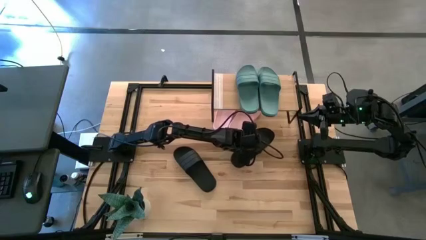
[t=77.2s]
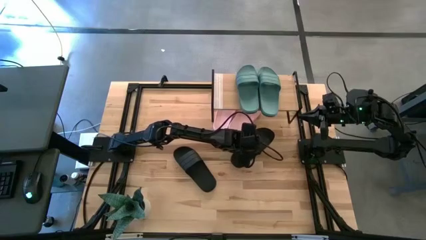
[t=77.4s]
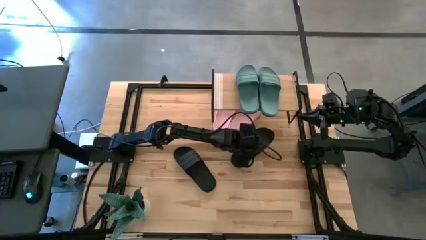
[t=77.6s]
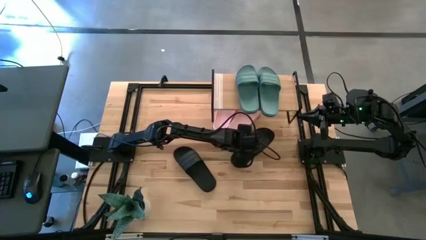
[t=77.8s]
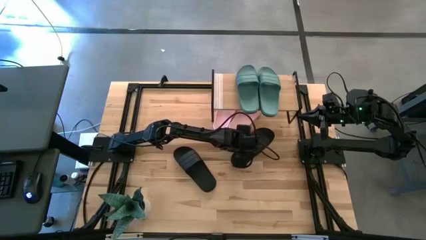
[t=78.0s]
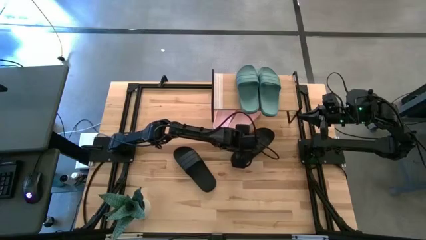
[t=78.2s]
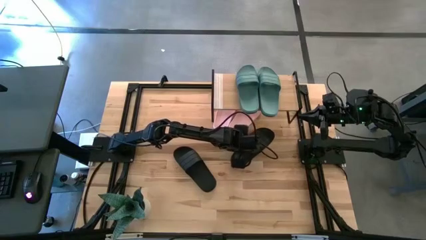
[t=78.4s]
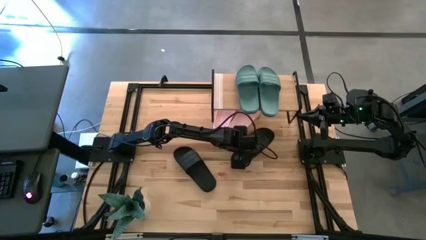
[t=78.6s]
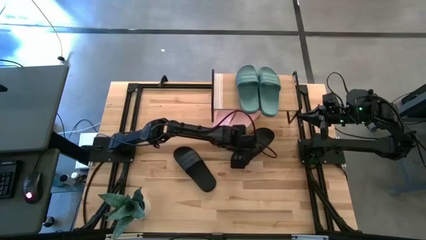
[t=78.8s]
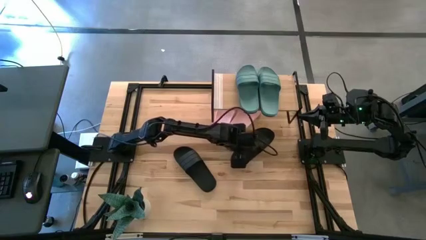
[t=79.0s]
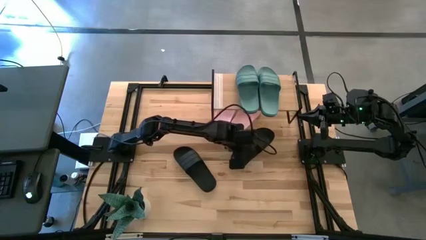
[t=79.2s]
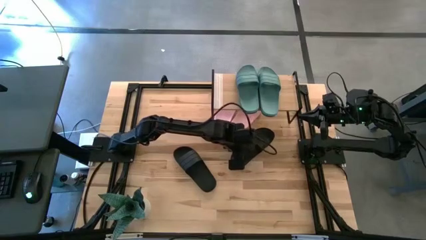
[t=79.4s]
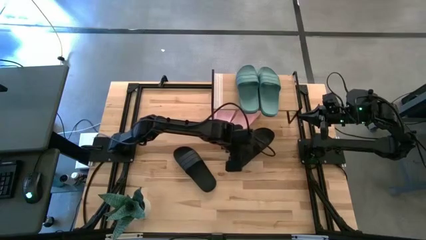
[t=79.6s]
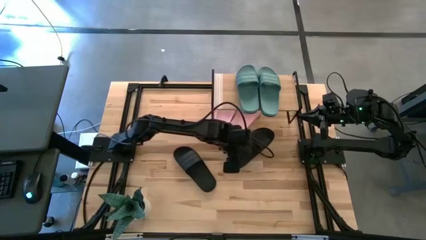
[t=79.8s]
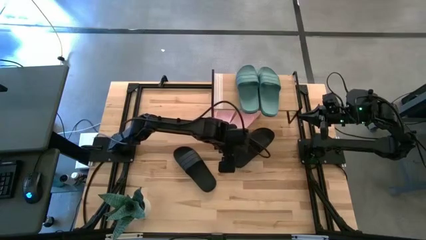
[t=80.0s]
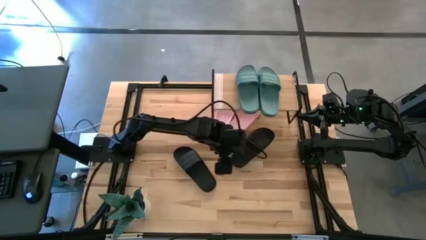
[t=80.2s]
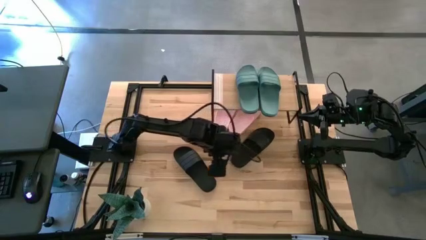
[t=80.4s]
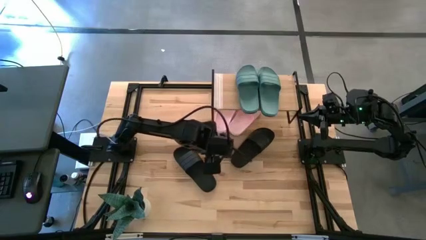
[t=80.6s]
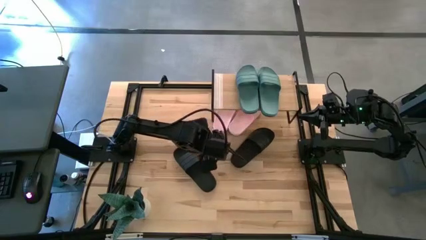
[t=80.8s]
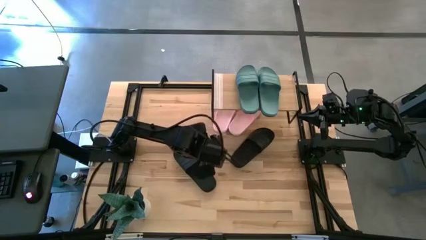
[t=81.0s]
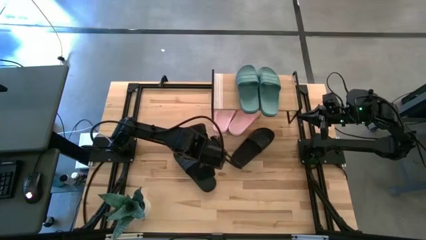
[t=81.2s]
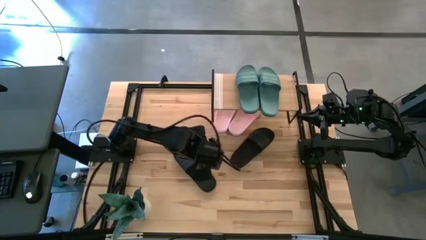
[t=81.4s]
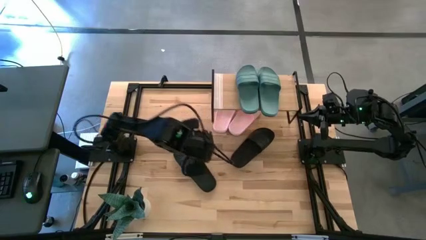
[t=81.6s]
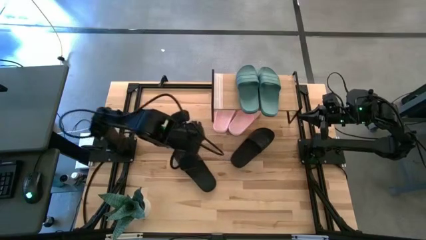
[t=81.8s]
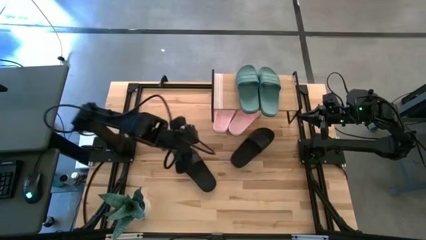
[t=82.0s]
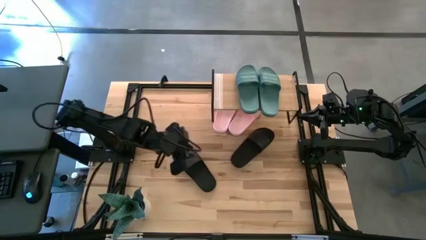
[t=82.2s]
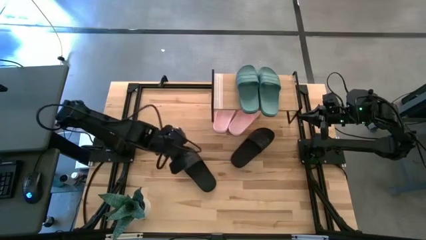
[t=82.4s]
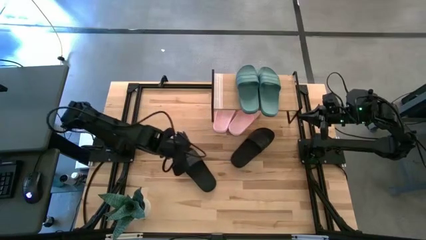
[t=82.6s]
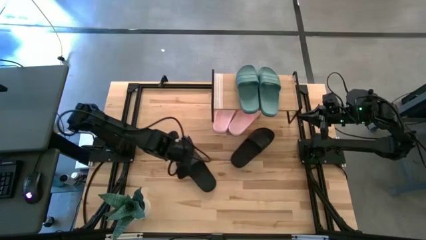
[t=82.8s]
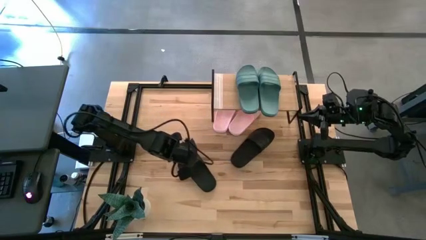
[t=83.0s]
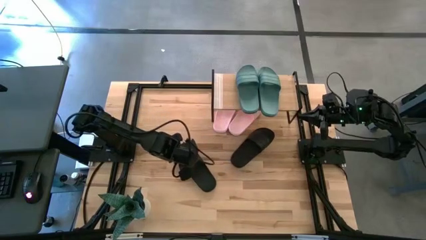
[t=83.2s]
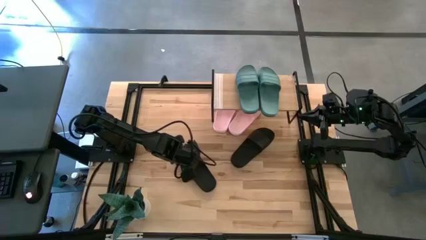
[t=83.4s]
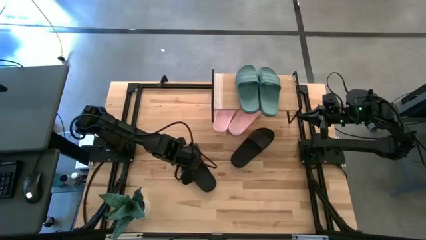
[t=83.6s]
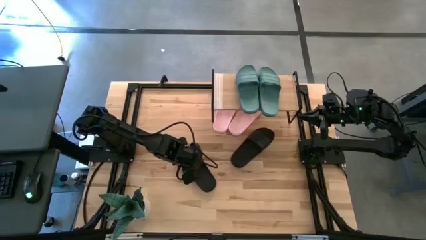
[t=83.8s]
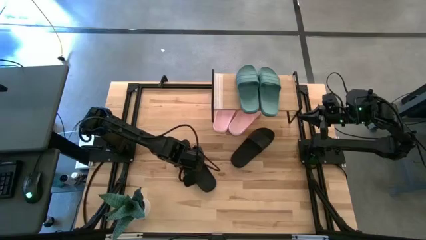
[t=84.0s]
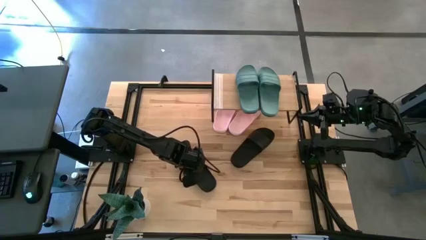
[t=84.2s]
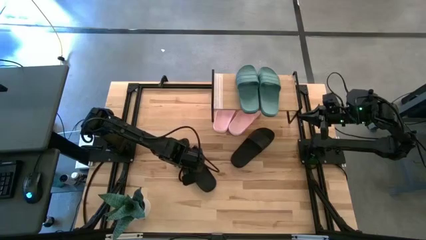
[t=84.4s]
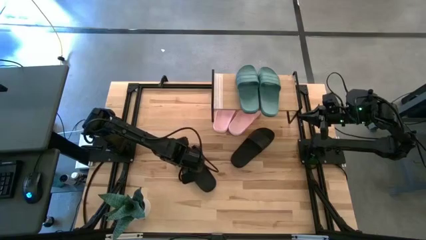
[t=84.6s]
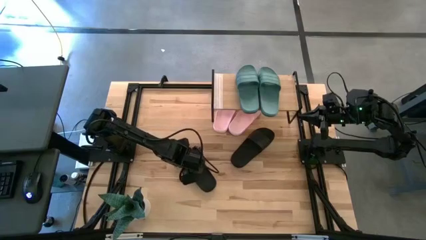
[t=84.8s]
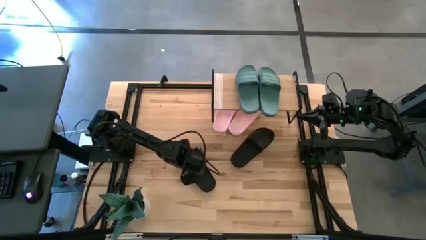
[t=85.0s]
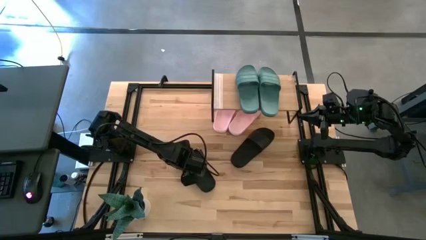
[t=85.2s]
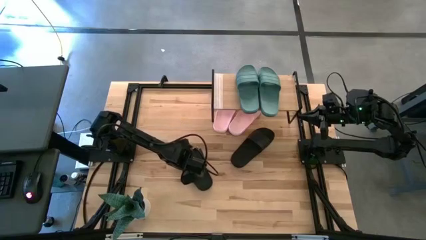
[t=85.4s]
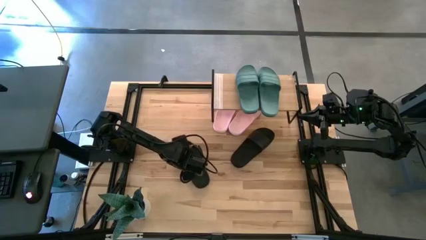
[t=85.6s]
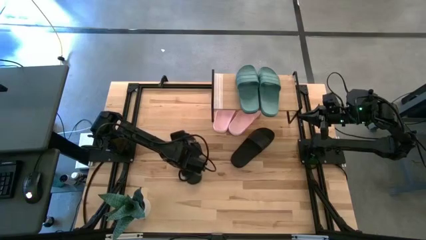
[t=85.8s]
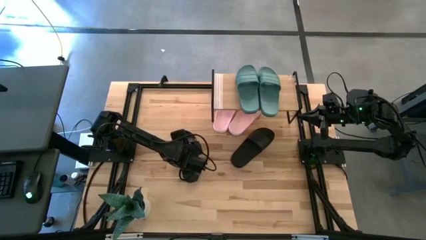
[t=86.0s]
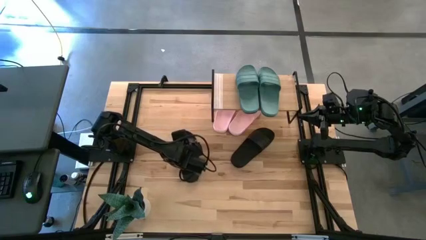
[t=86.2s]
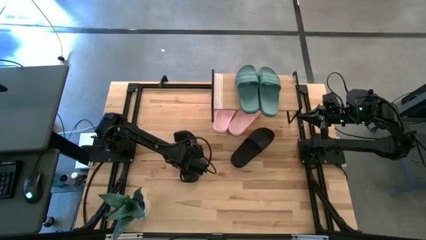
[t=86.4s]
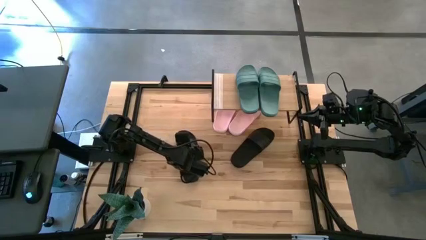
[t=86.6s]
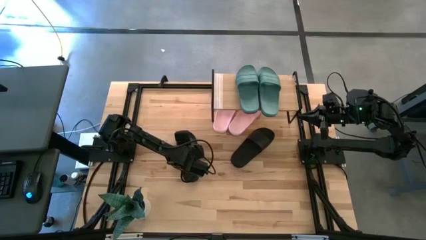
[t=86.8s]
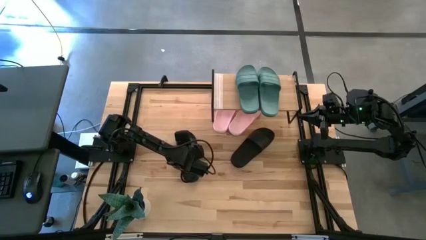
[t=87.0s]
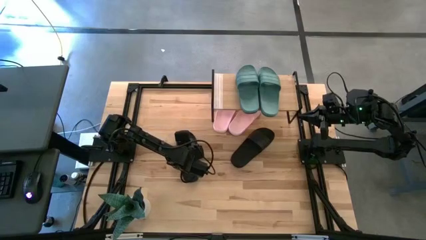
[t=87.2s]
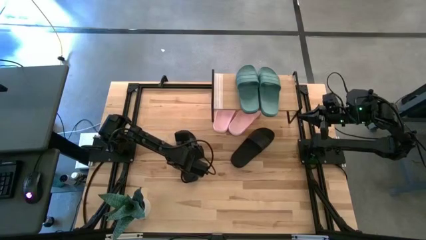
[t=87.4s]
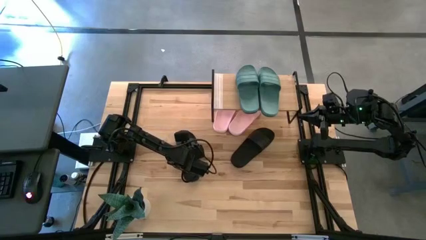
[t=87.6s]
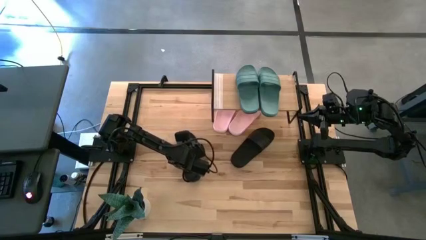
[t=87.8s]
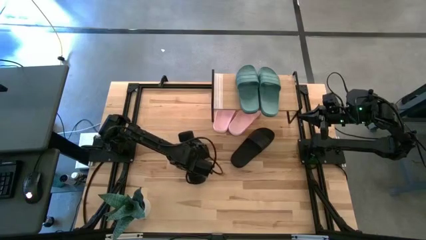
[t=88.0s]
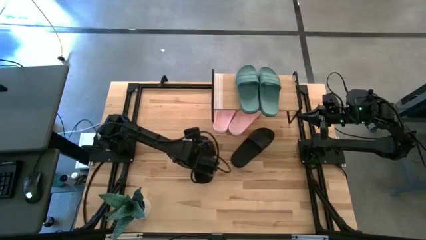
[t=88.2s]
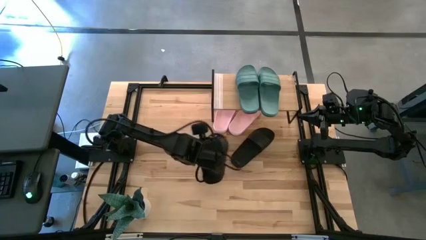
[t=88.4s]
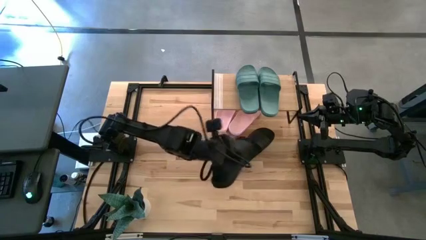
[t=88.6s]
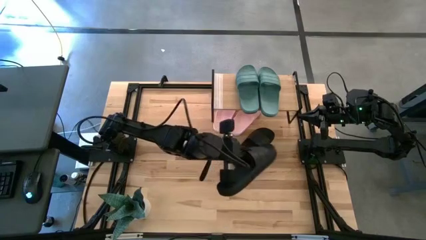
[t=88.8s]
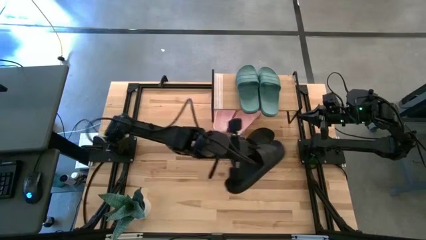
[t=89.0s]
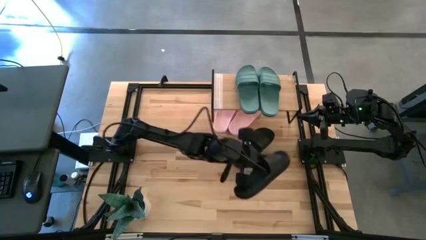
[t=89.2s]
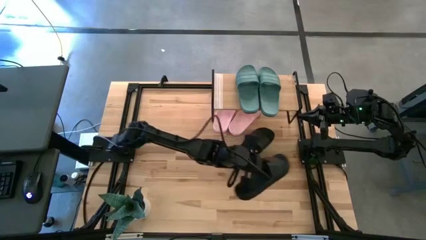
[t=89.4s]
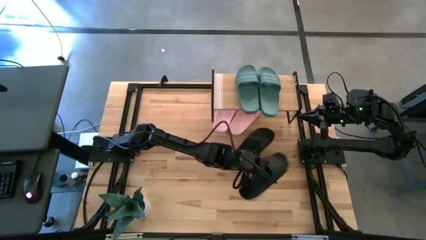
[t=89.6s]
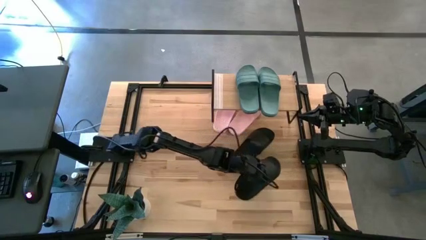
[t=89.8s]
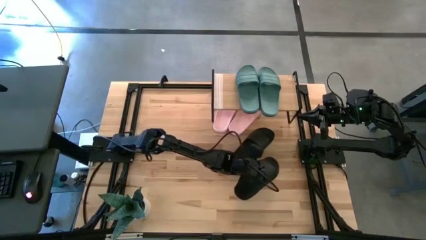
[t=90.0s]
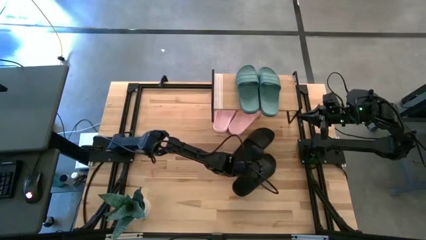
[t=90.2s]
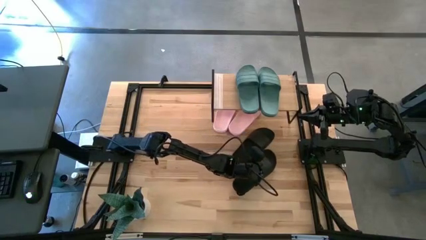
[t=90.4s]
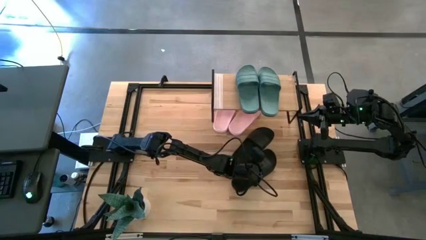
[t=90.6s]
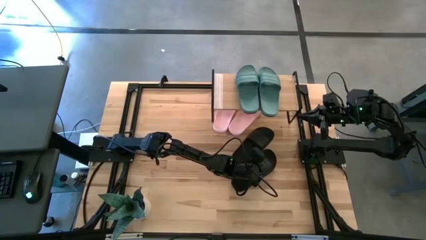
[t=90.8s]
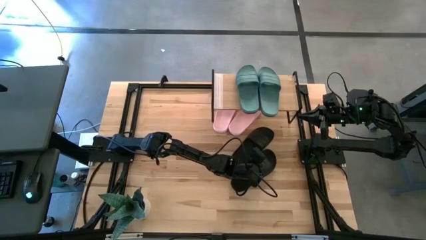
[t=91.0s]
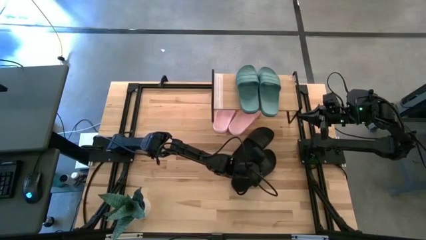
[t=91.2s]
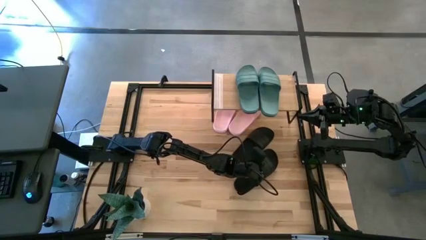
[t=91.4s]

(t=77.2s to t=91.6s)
Task: Pick and place slides into the shelf
Move the black slide to the top right of the table
